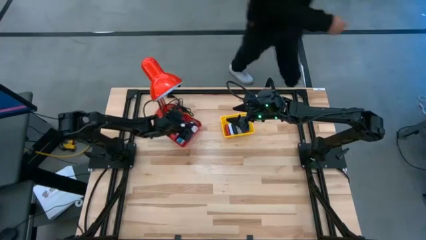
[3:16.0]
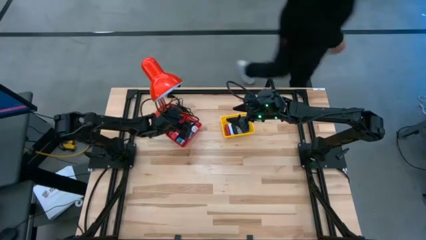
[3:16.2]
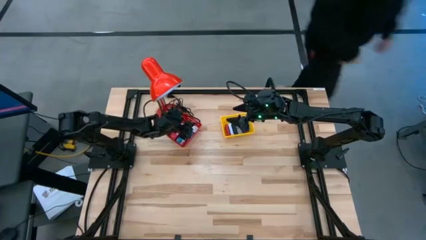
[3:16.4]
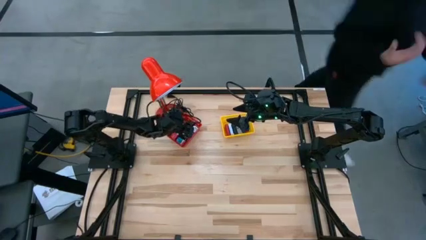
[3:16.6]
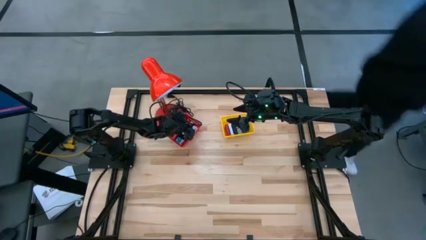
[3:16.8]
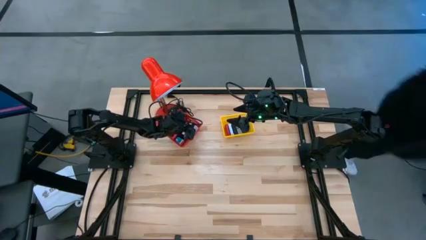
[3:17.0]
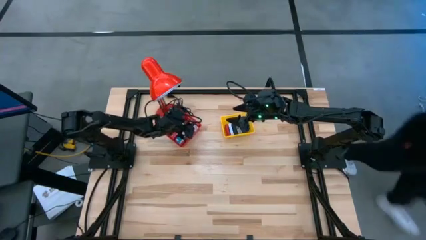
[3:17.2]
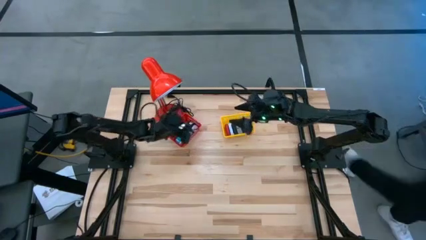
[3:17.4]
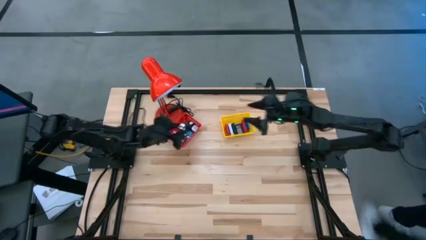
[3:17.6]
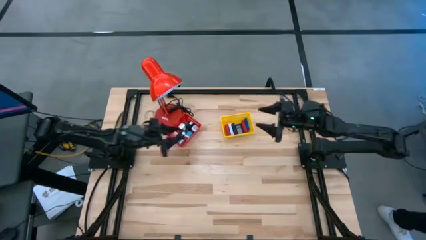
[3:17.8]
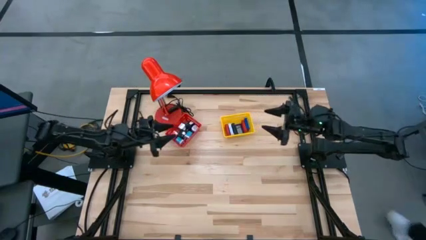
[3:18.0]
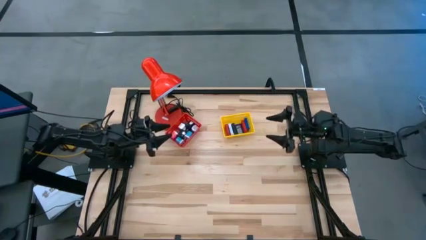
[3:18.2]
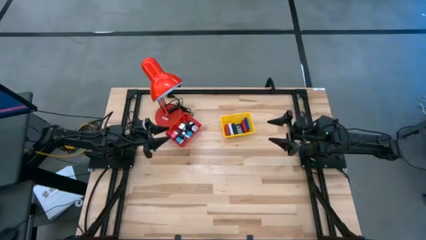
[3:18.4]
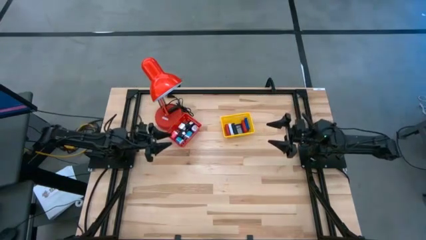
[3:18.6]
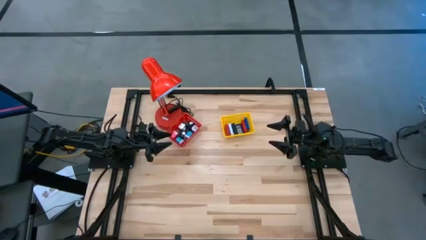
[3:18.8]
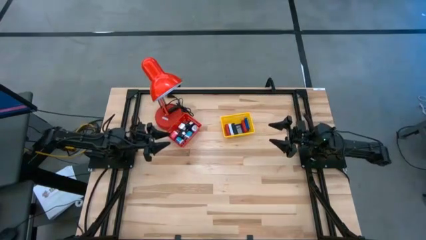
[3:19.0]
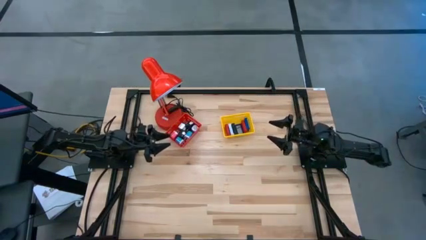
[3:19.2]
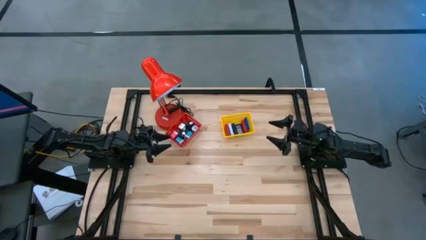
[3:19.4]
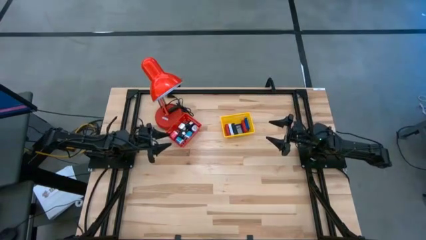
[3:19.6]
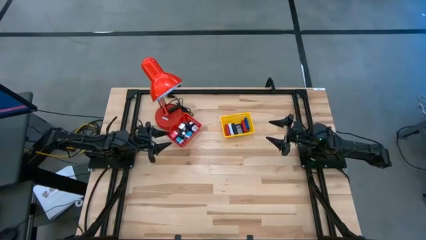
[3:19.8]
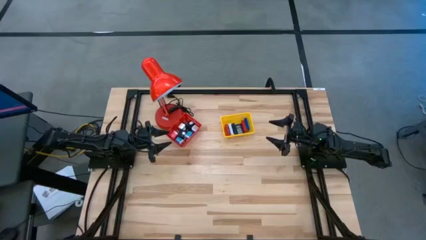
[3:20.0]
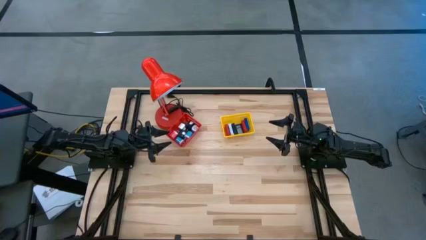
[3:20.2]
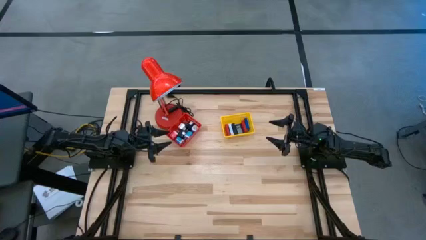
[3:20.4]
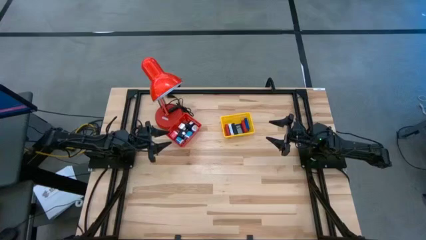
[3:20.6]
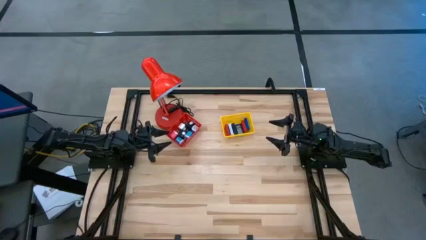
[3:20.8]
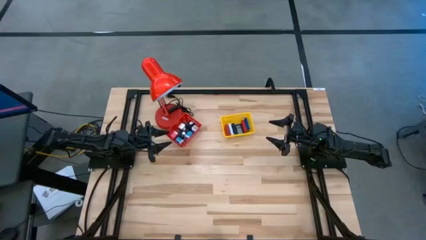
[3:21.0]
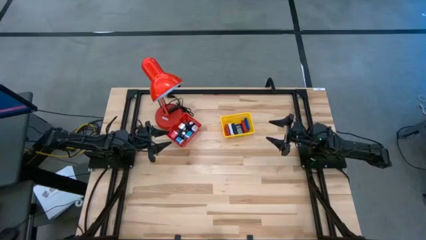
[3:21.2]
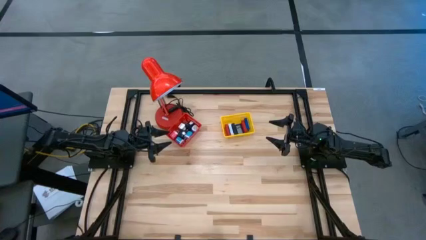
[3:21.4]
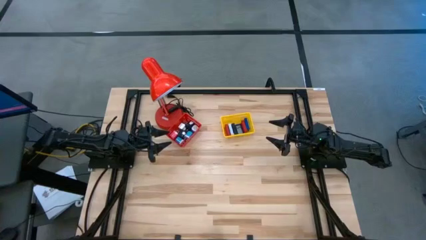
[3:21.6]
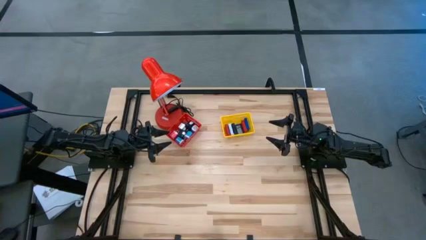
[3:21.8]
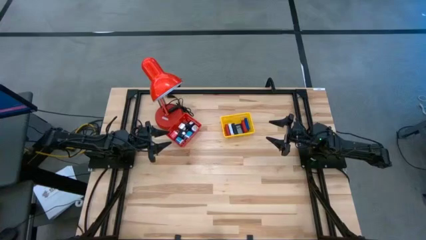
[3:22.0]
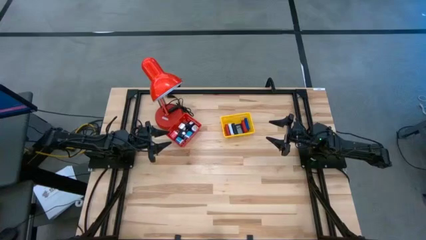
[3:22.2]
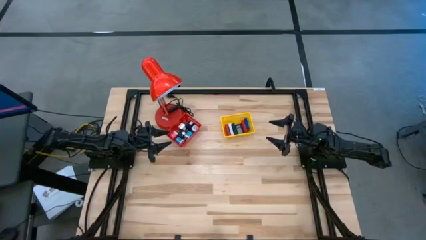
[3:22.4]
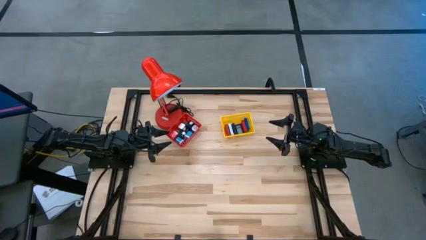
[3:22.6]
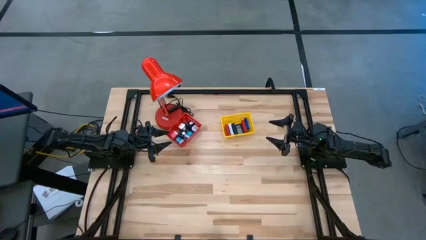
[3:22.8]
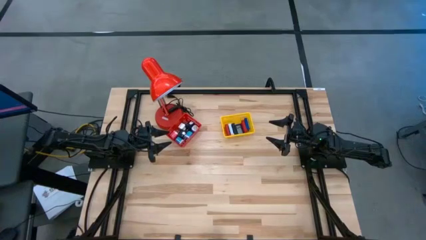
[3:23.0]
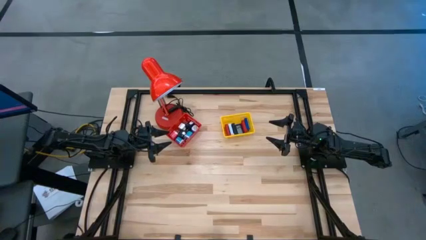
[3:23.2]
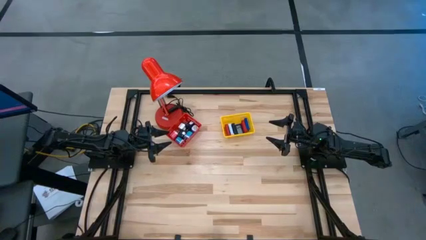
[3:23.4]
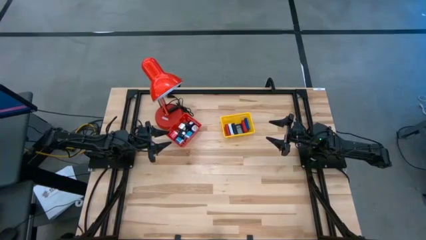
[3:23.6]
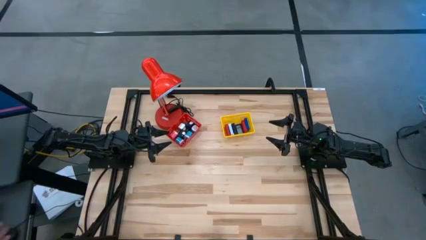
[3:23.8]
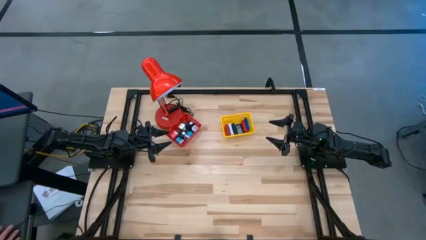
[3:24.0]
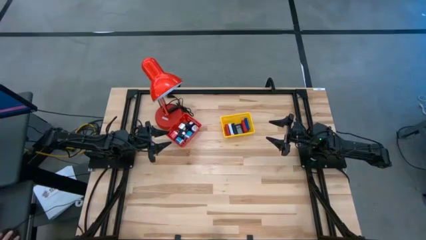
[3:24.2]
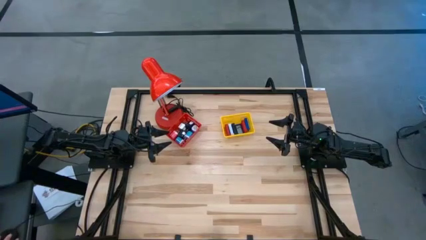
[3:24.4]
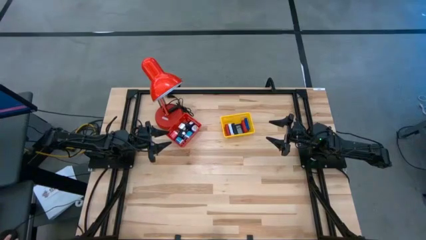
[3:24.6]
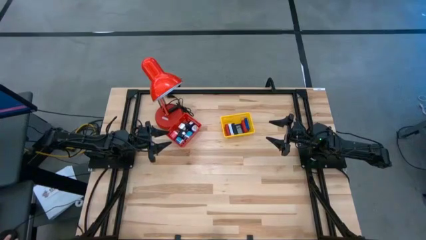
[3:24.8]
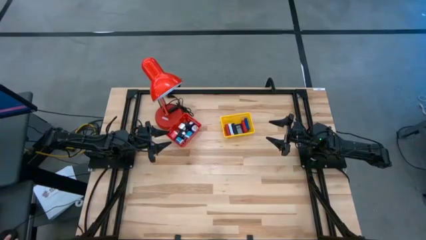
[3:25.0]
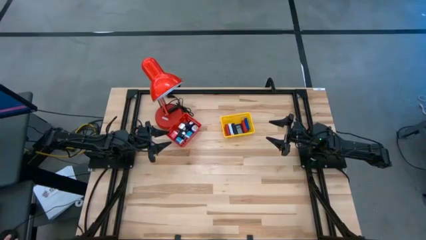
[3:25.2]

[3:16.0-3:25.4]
Task: Pick & Place Office items
Return to Home Position

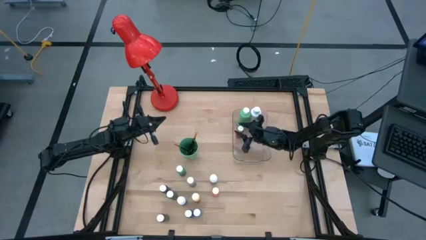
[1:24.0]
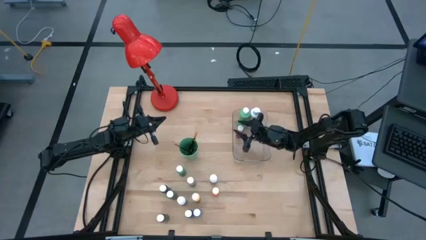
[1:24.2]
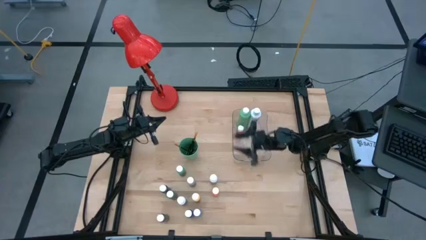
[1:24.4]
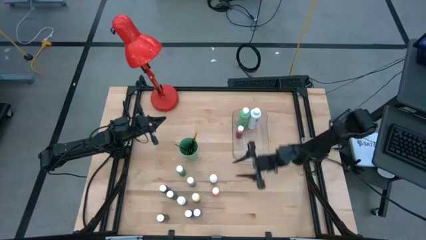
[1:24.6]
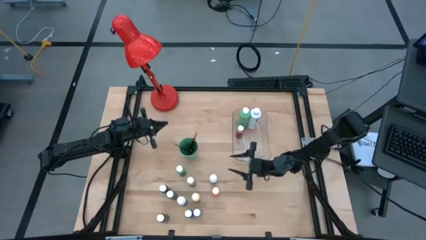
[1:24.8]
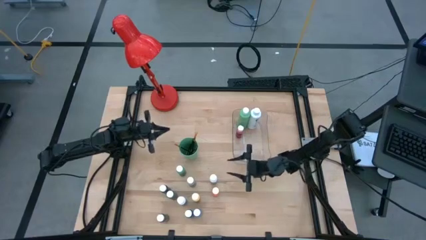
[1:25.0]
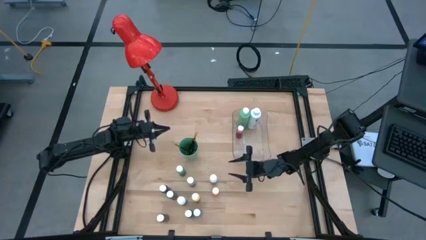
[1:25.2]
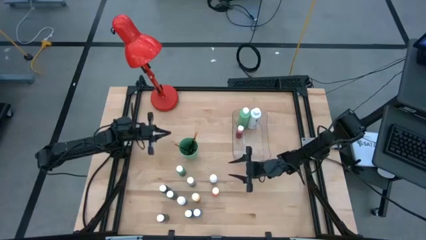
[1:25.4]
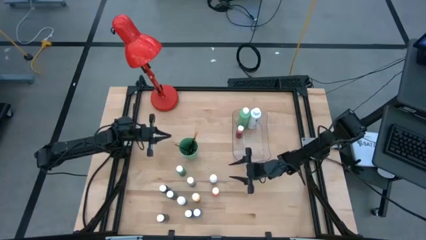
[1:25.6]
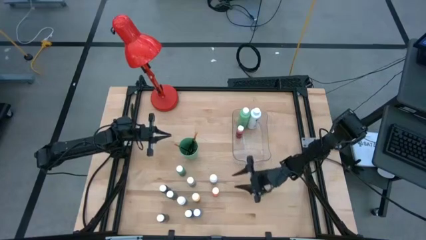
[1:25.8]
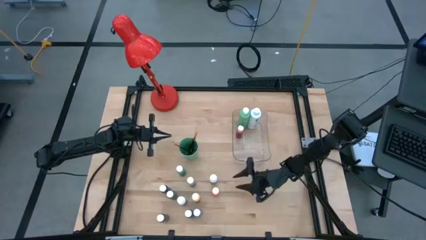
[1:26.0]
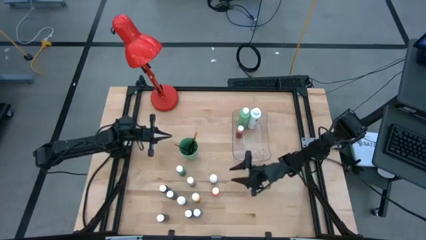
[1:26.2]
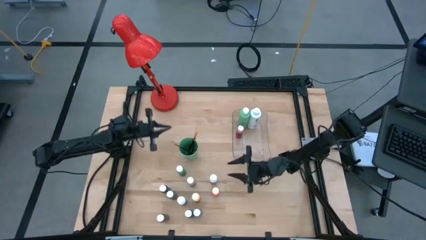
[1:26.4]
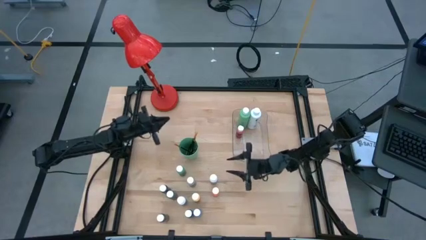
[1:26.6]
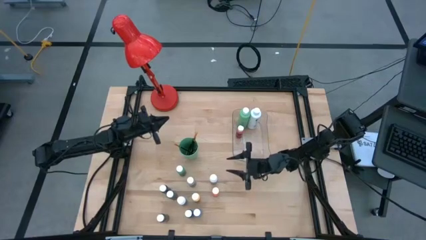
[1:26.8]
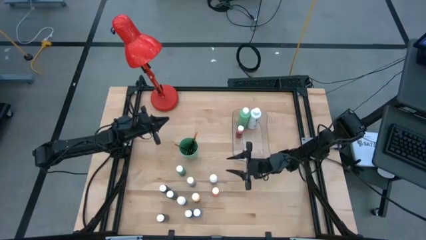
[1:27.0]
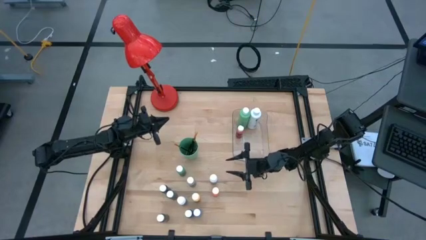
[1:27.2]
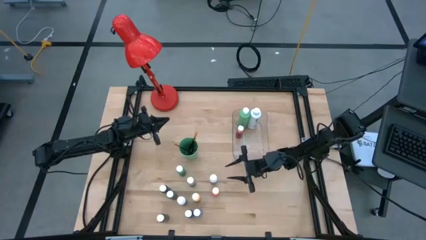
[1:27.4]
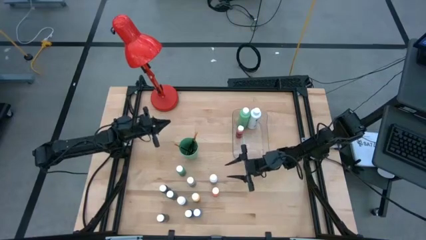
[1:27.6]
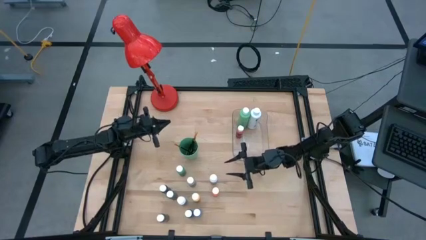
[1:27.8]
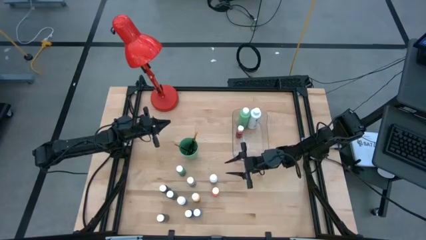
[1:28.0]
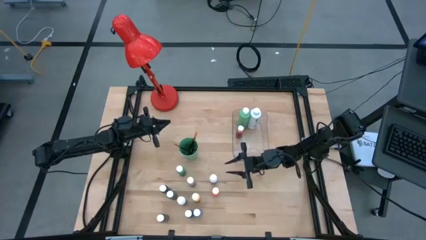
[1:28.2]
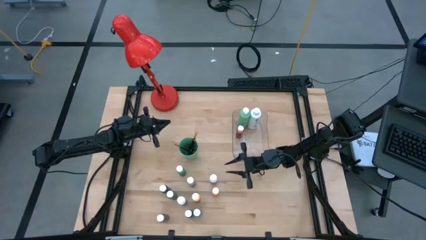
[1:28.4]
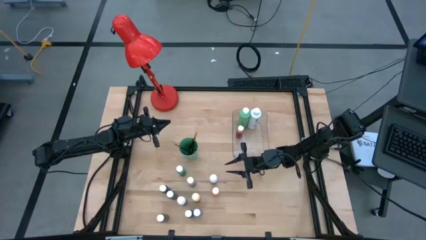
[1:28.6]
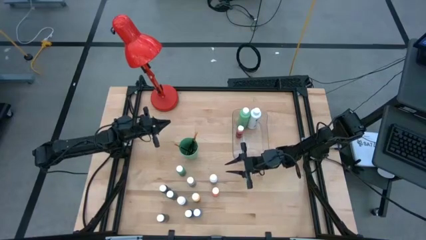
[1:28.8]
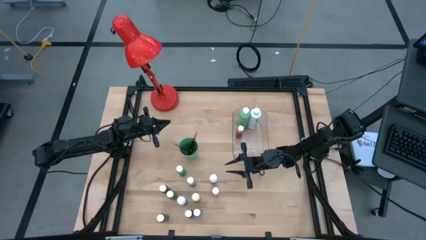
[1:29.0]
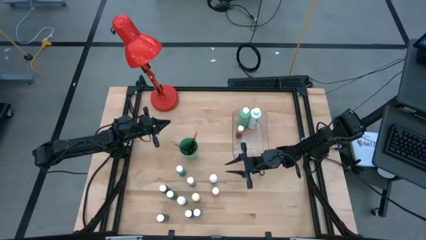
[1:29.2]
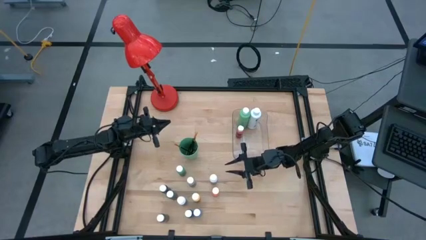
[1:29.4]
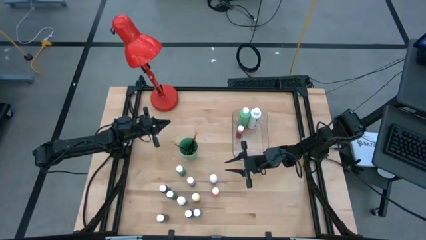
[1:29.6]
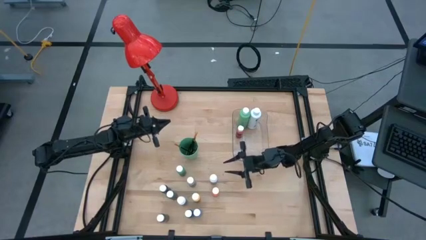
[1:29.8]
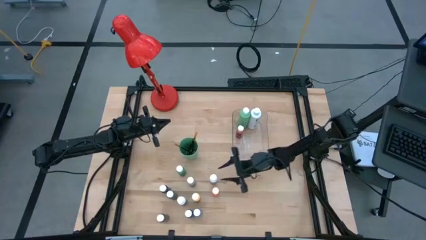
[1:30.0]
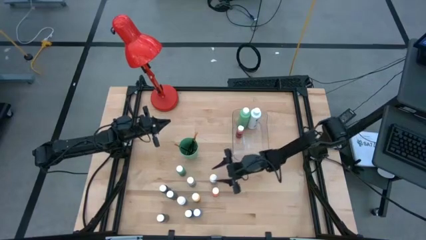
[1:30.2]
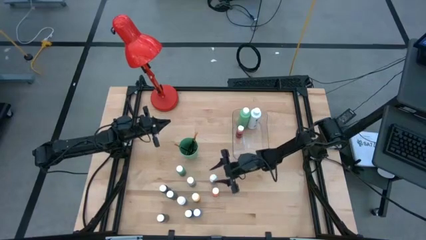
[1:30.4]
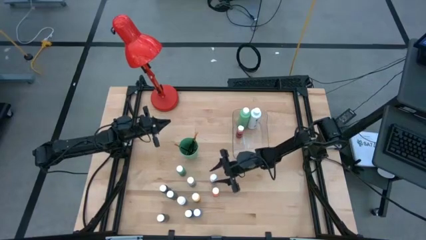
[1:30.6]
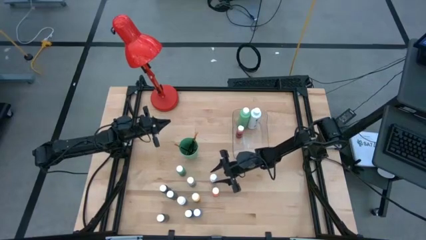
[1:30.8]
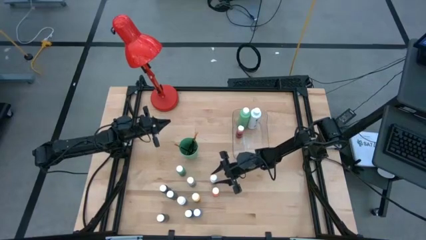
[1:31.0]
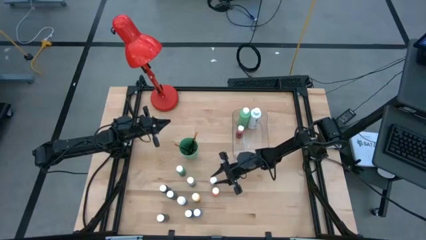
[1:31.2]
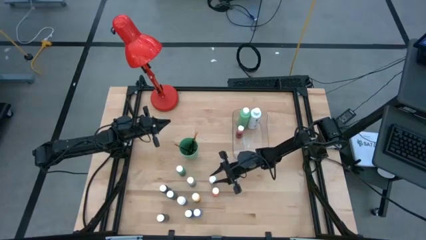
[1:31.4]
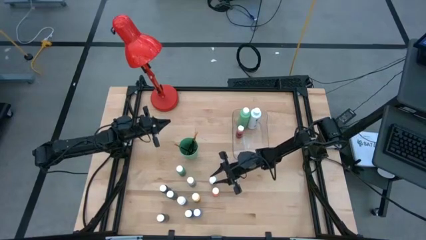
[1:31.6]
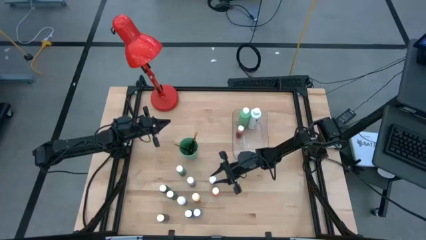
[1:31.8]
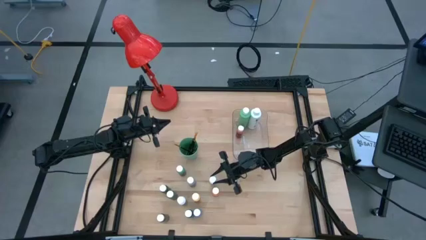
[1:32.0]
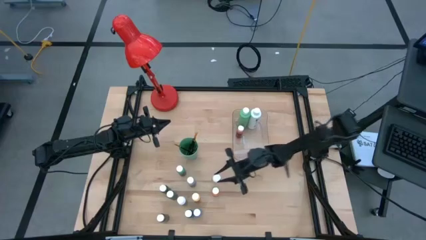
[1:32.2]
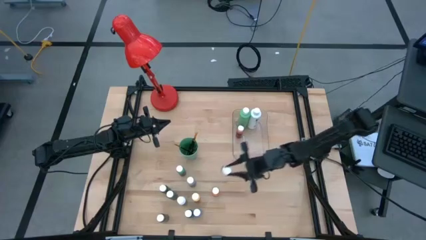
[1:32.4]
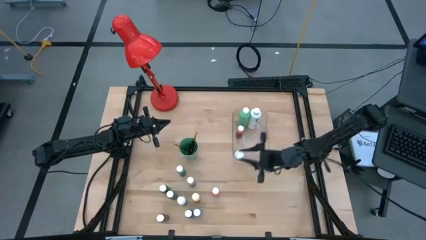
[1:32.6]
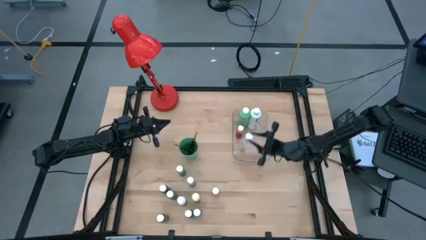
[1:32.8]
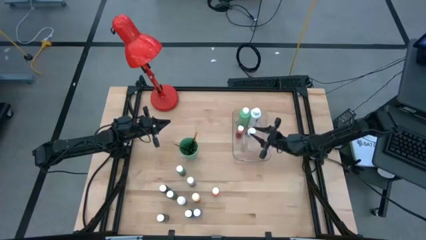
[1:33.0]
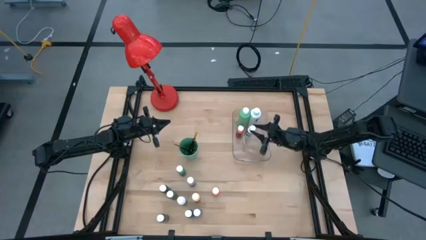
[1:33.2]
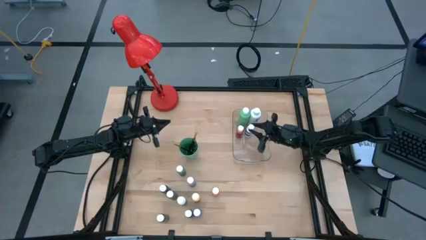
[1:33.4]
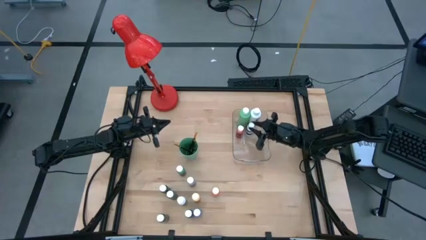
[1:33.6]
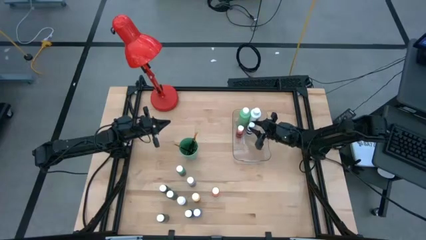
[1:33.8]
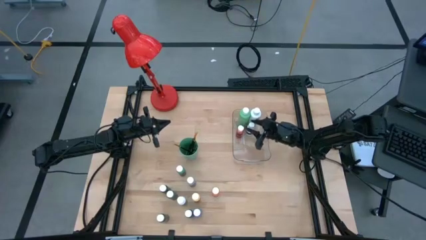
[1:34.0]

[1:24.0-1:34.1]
Task: Pick & Place Paint Supplies
Put the right small white paint bottle into the transparent bin
